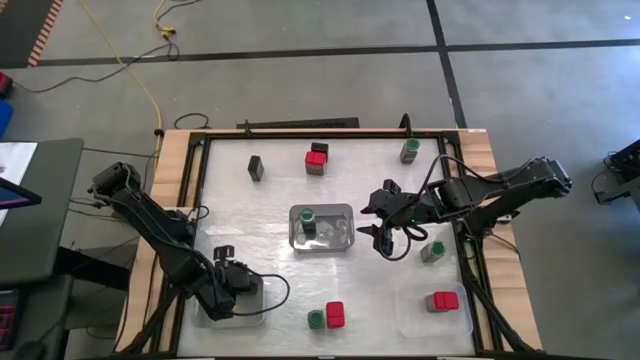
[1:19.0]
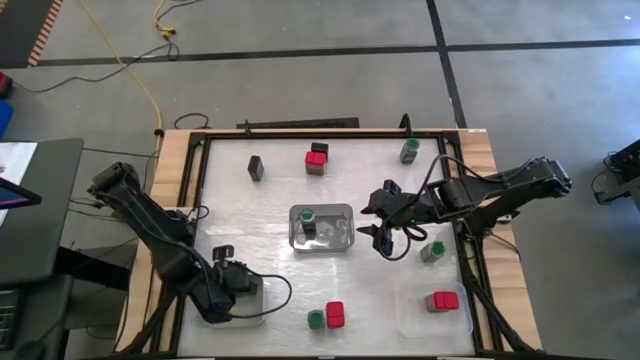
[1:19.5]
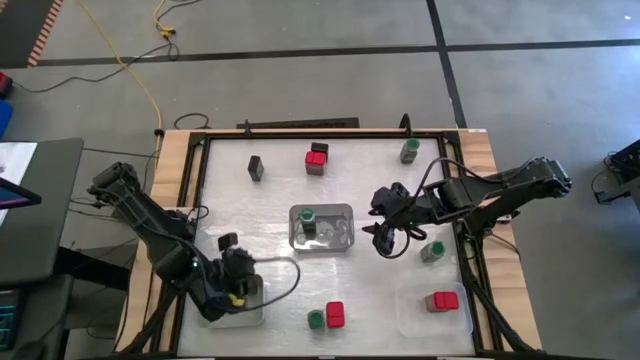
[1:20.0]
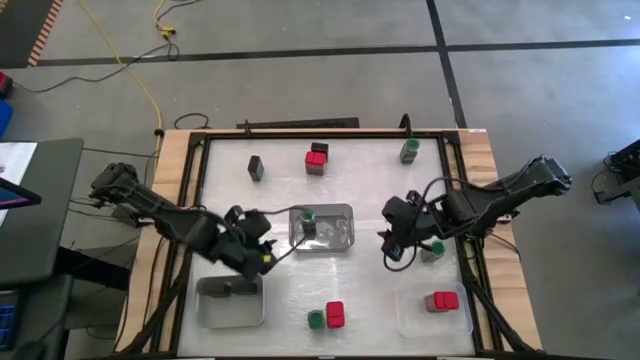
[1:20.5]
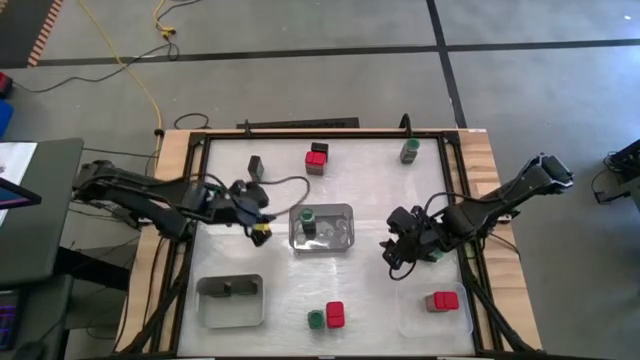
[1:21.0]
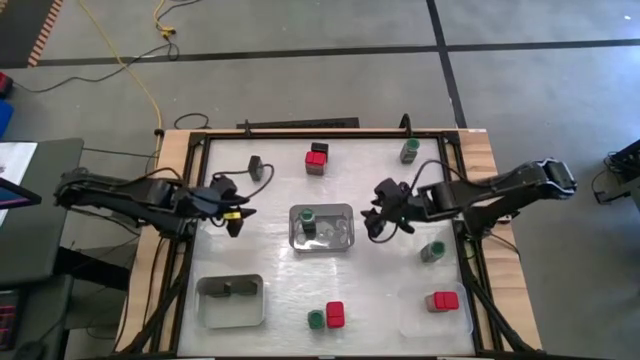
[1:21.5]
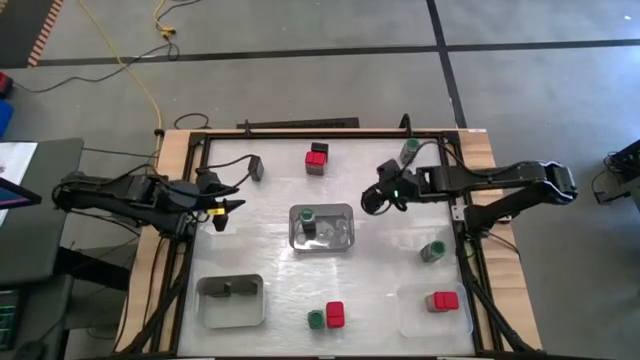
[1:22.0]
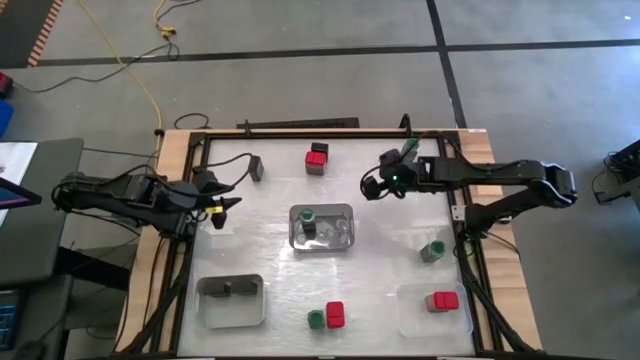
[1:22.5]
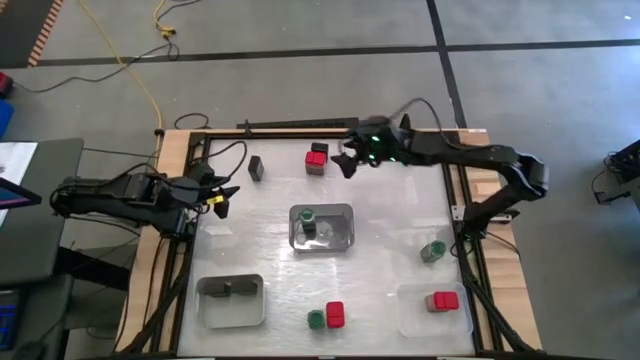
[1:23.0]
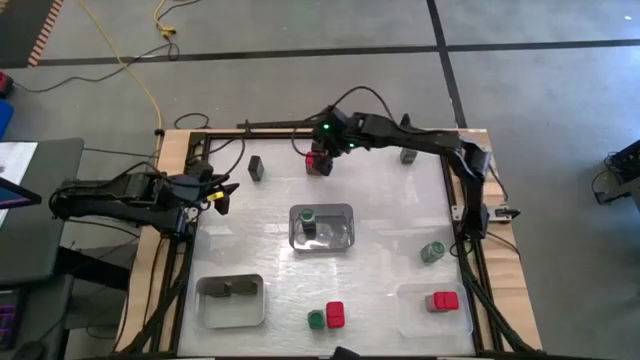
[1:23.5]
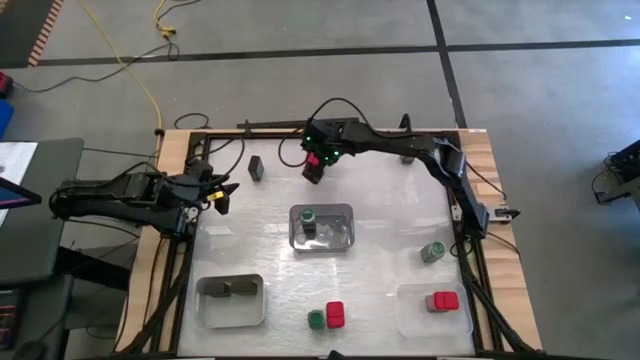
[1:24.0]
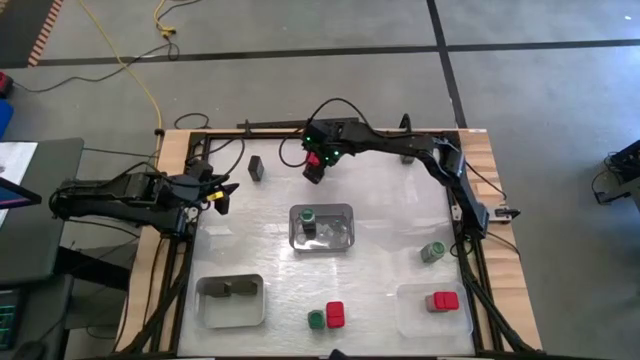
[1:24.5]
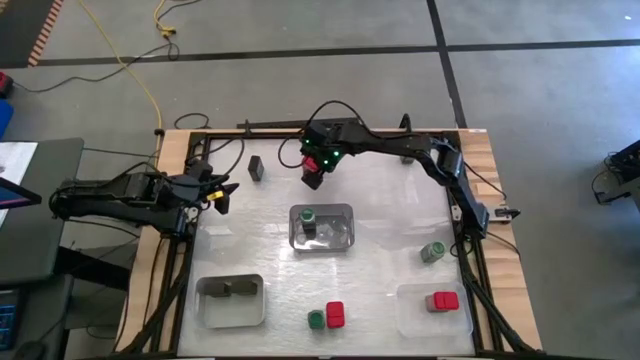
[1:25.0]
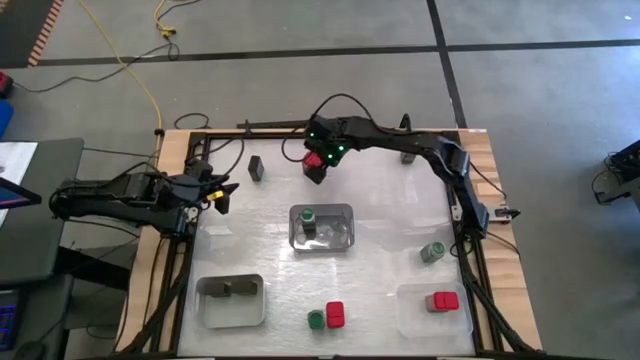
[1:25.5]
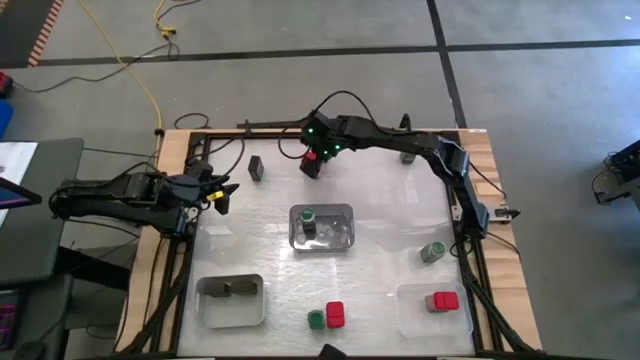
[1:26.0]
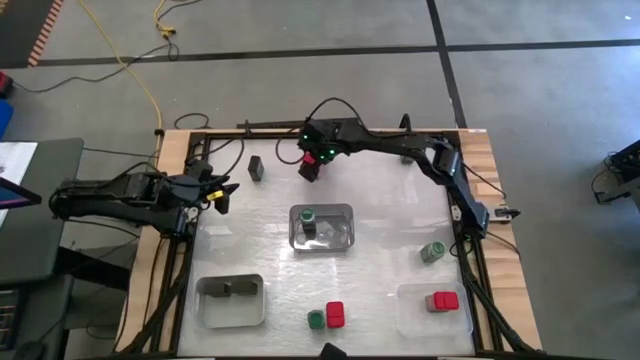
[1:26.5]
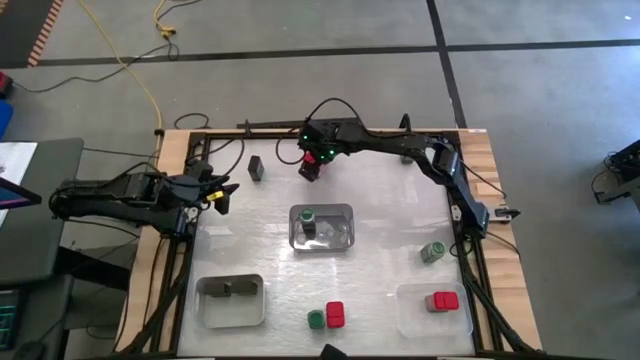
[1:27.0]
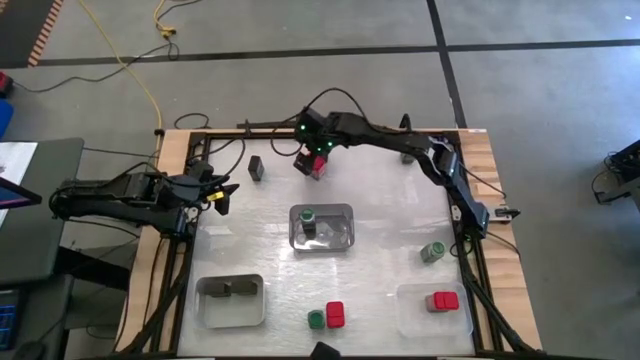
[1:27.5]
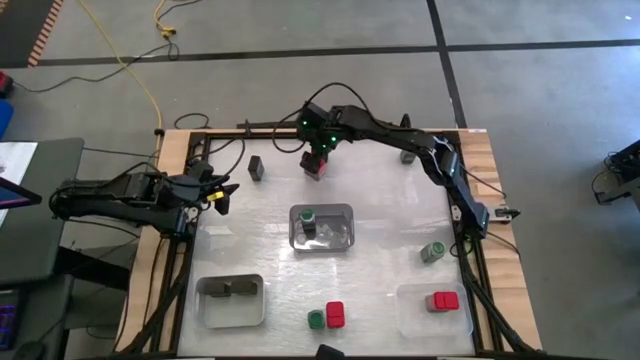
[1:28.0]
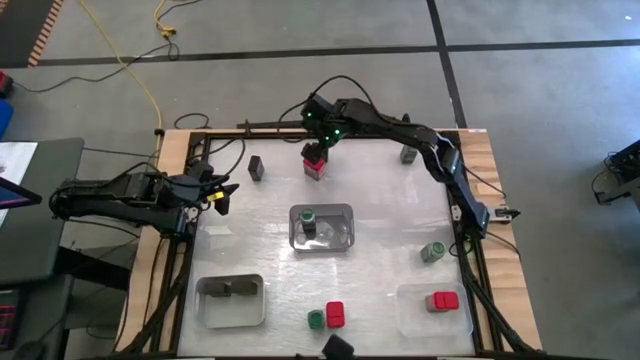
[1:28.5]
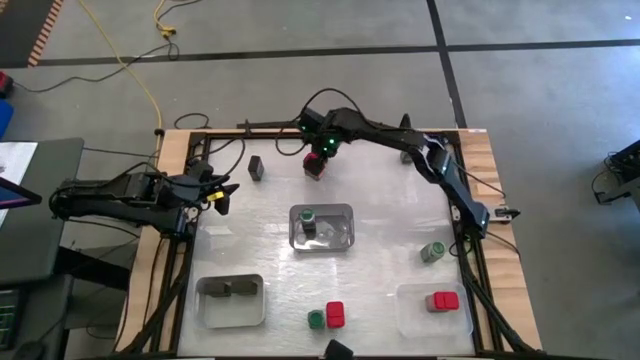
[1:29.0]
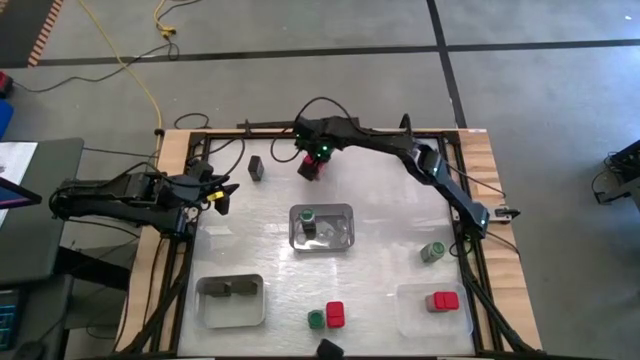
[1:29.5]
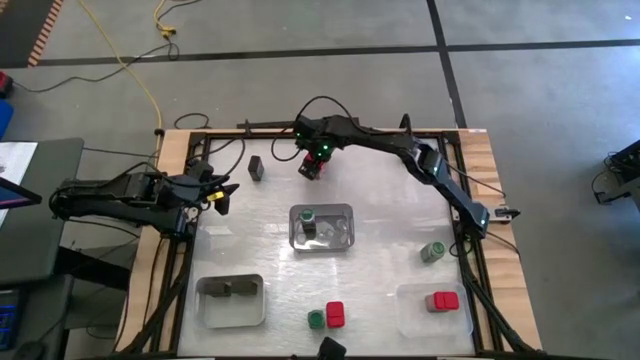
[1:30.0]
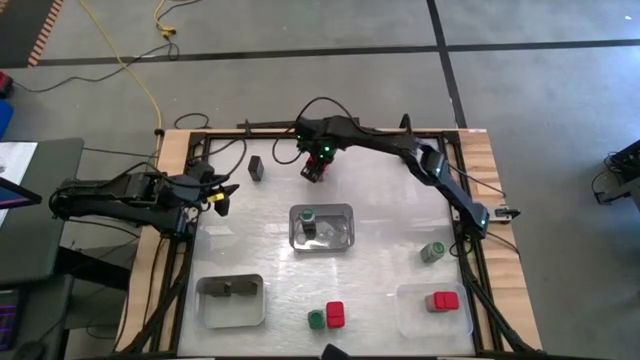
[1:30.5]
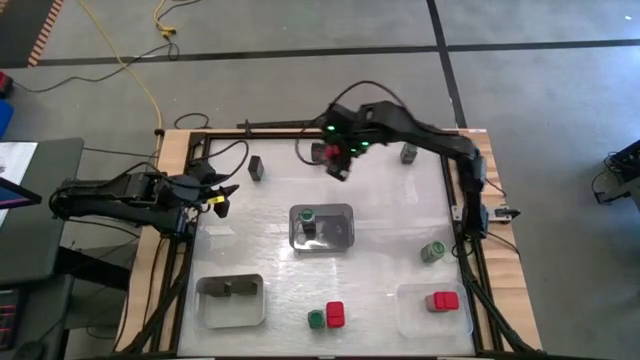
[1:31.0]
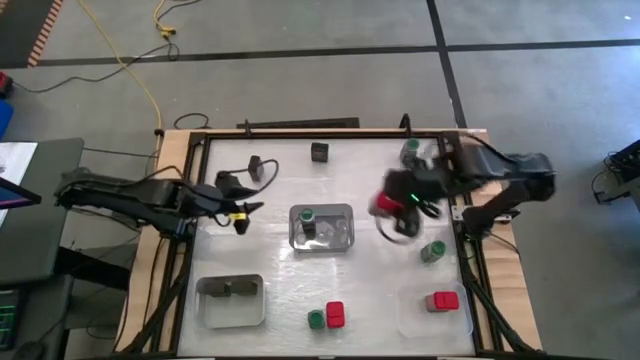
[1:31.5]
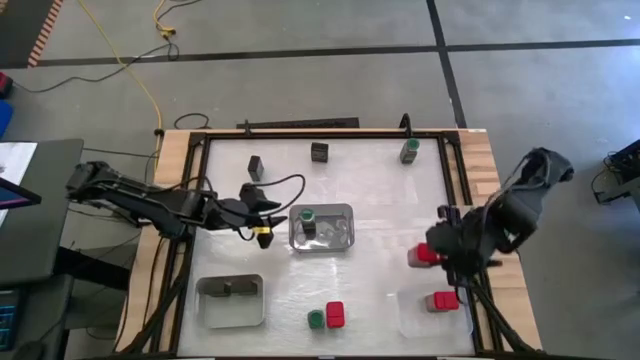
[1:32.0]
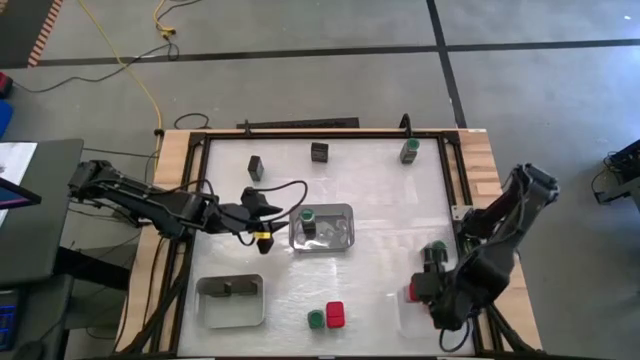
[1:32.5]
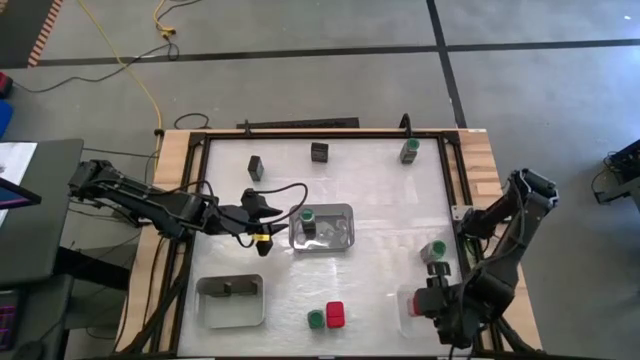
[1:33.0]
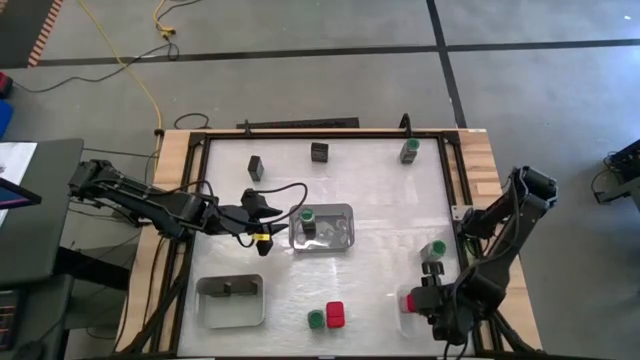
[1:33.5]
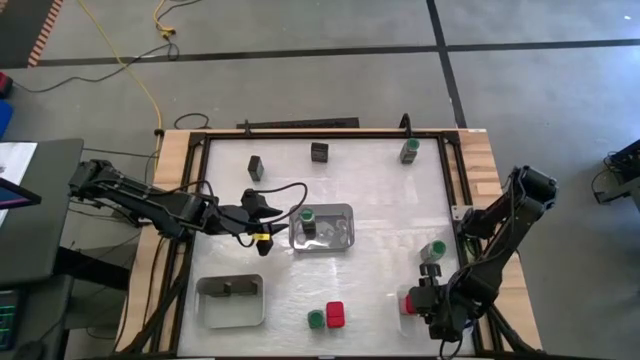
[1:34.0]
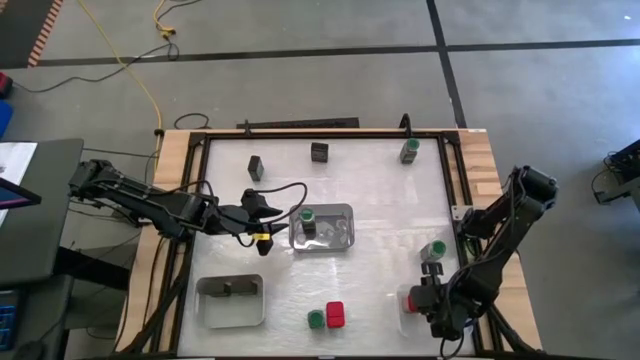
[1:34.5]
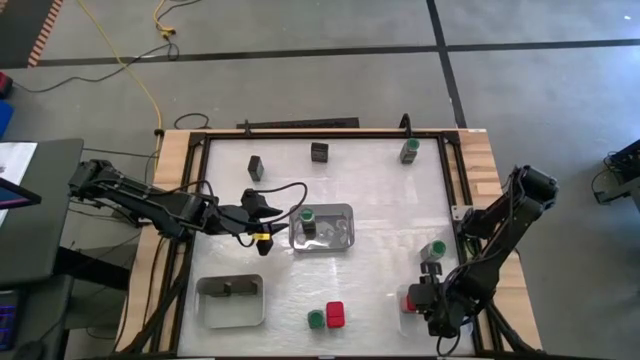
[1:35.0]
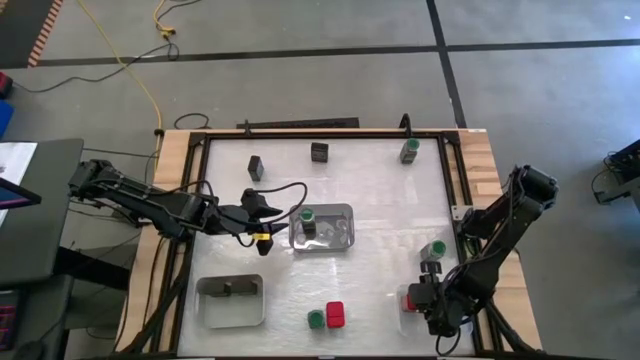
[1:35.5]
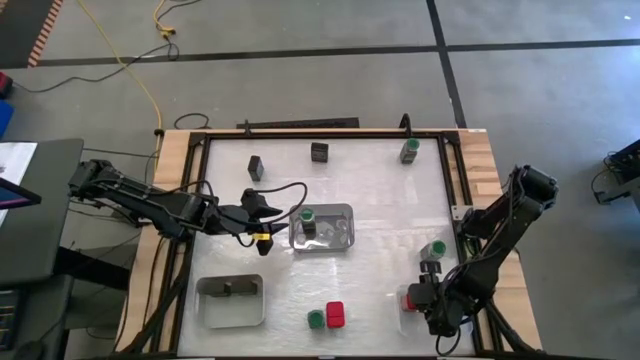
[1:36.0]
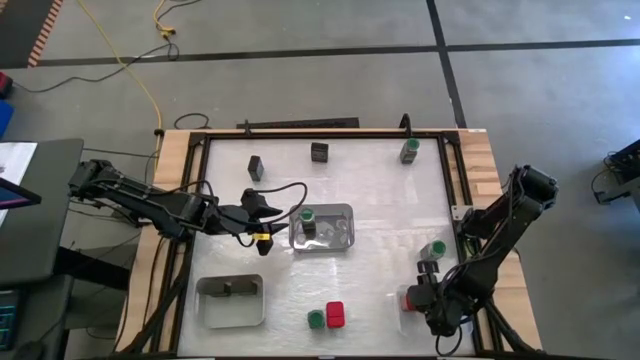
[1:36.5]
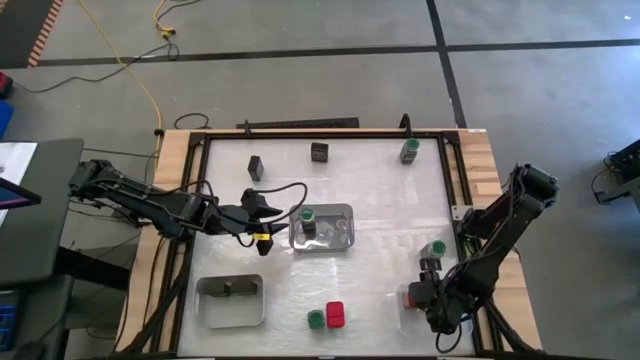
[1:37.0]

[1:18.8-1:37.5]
Task: Sort spices by type
Put the top red seasoning can into the transparent bin

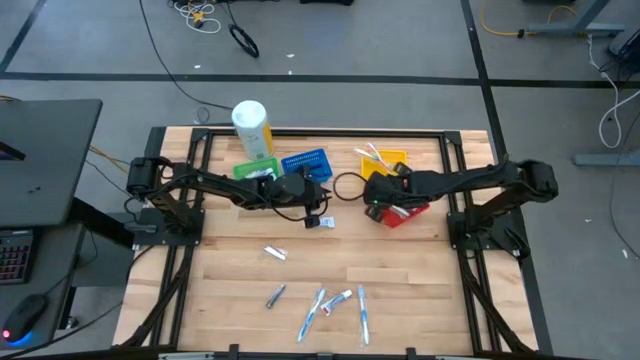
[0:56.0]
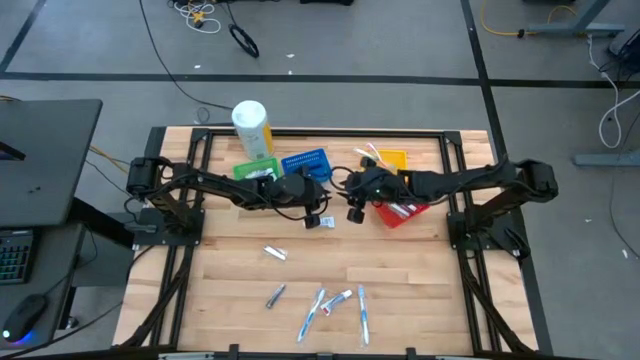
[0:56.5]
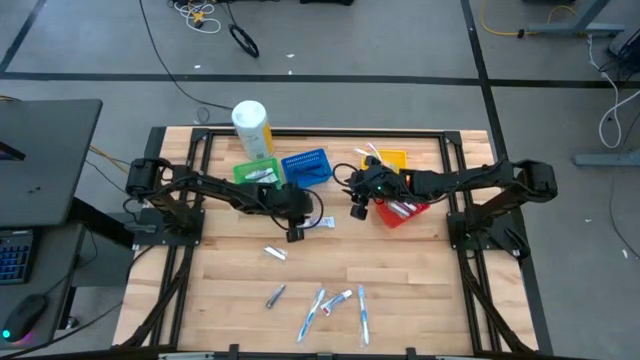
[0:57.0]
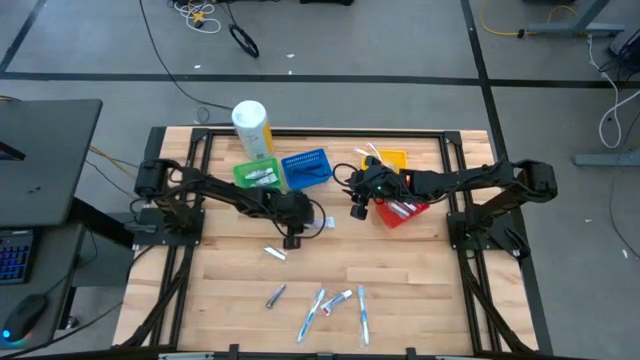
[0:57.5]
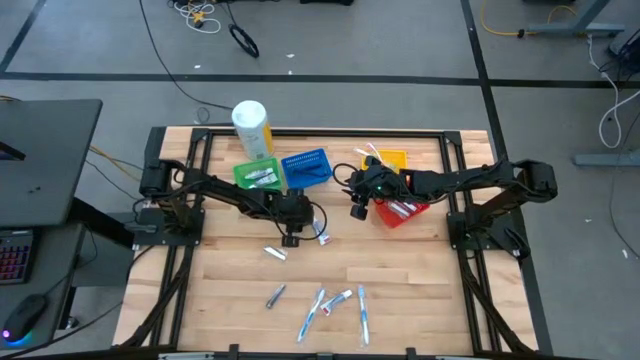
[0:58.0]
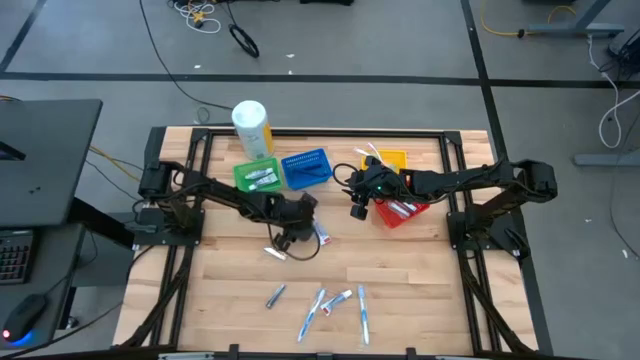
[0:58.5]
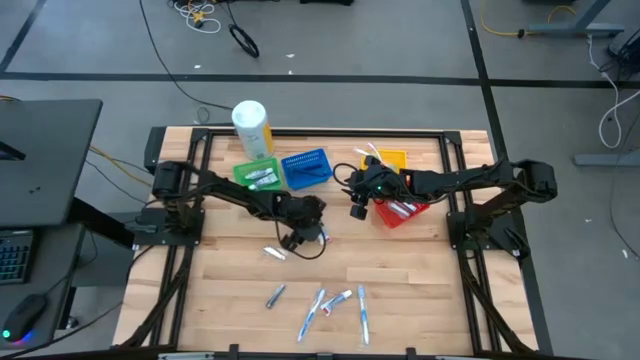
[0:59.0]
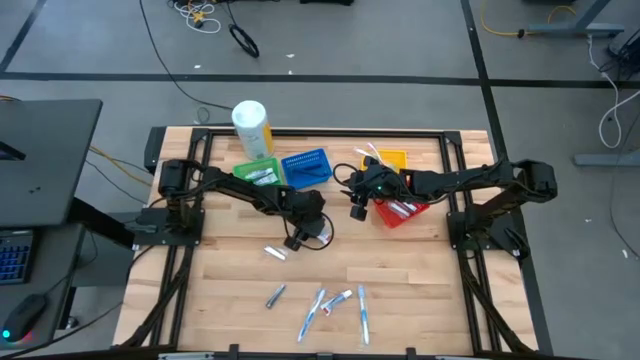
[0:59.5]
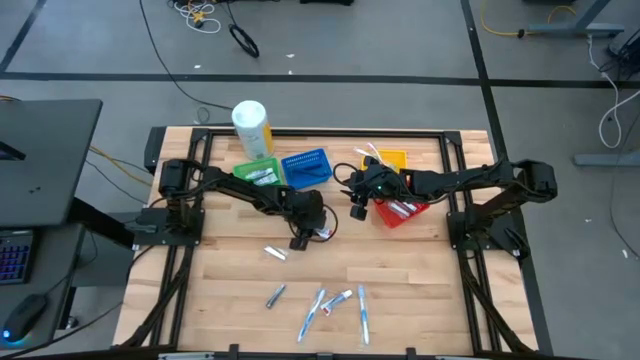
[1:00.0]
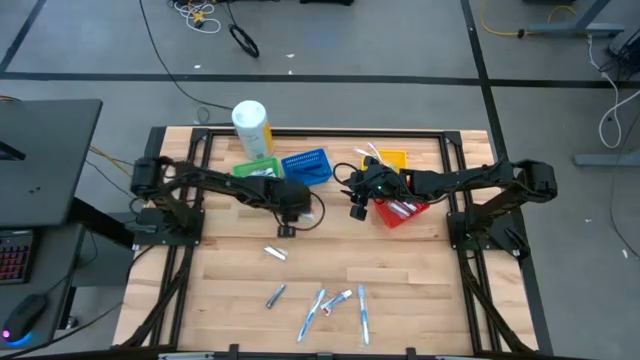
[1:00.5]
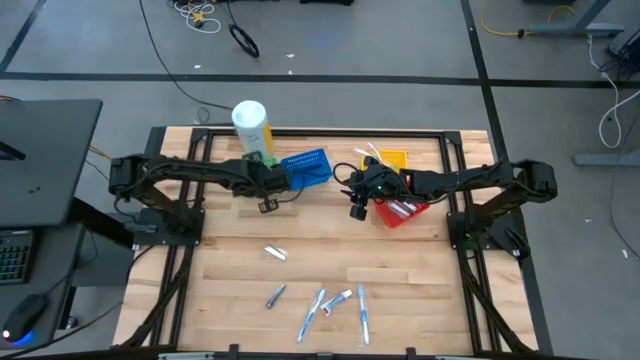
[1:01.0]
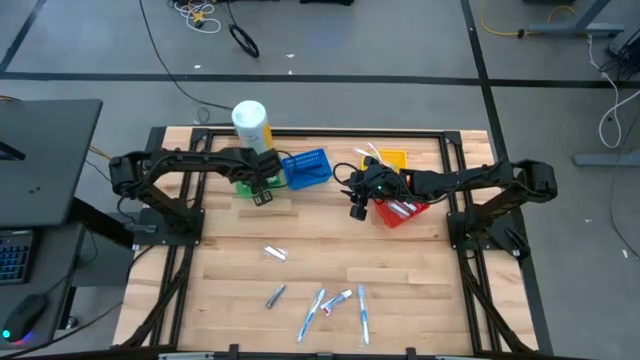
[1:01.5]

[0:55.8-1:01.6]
Task: Pick & Place Travel size toiletries
Put the white toothpaste into the green bin
